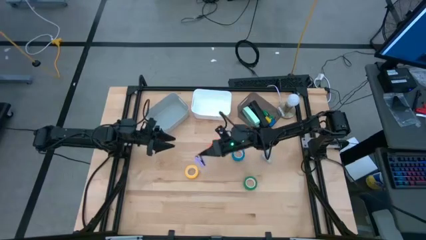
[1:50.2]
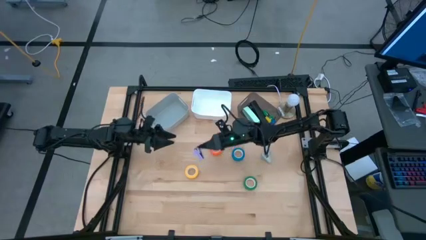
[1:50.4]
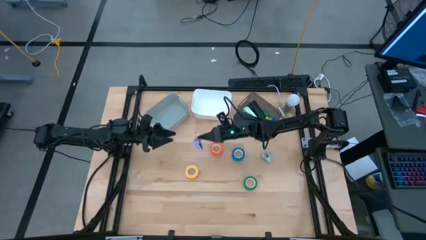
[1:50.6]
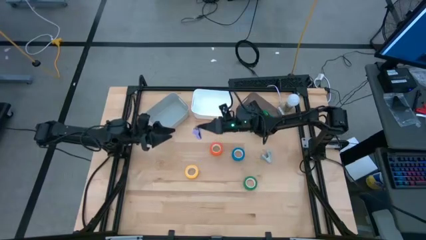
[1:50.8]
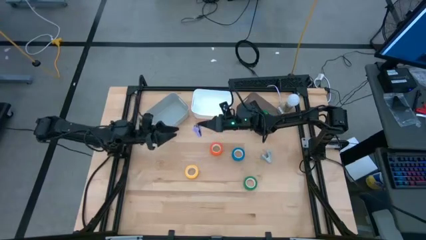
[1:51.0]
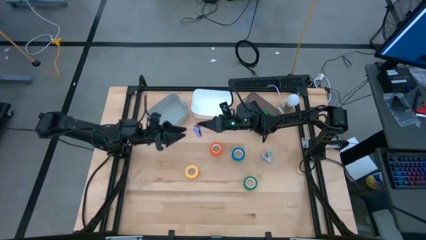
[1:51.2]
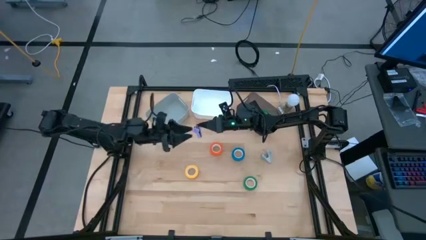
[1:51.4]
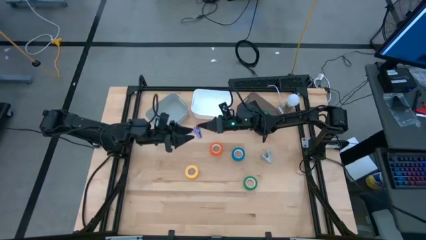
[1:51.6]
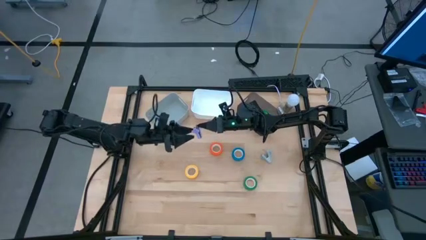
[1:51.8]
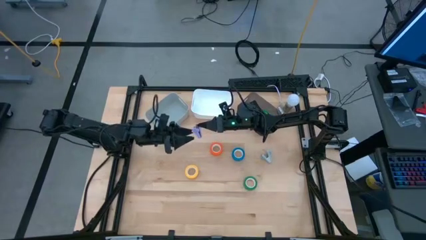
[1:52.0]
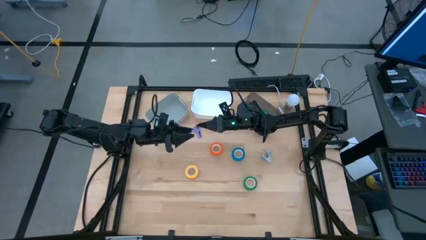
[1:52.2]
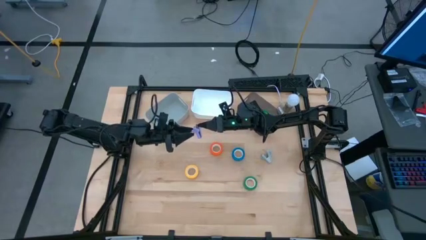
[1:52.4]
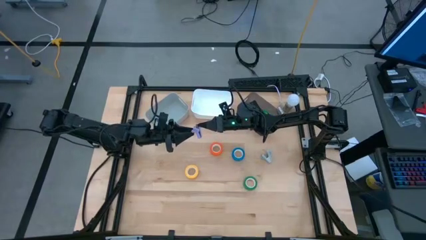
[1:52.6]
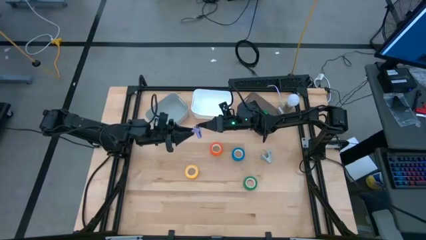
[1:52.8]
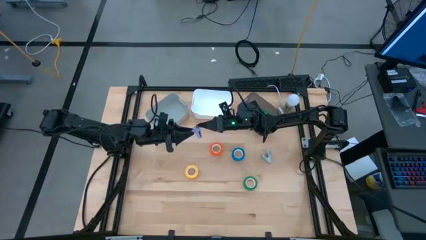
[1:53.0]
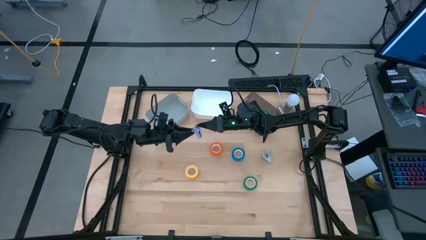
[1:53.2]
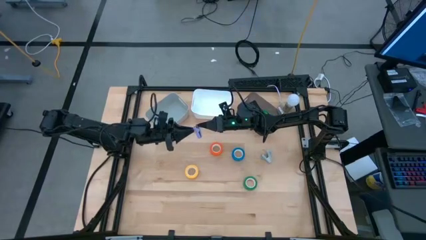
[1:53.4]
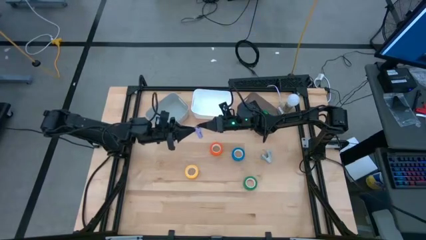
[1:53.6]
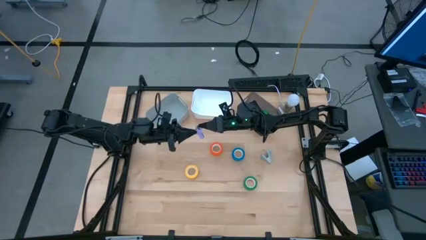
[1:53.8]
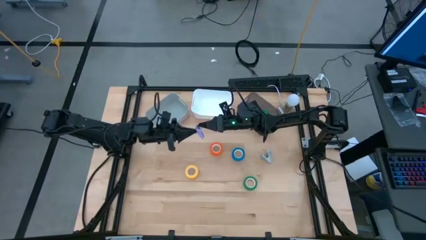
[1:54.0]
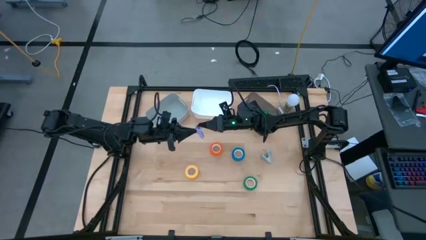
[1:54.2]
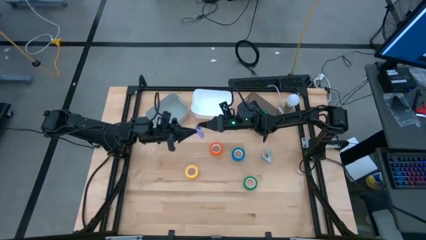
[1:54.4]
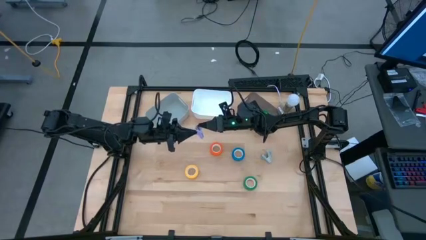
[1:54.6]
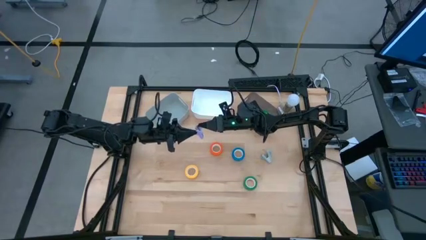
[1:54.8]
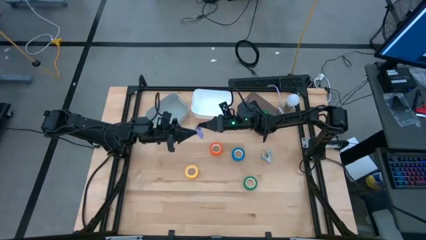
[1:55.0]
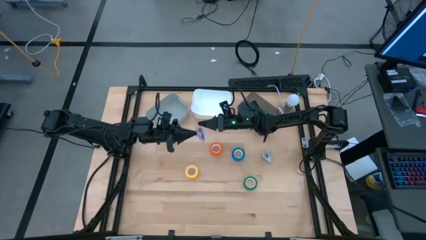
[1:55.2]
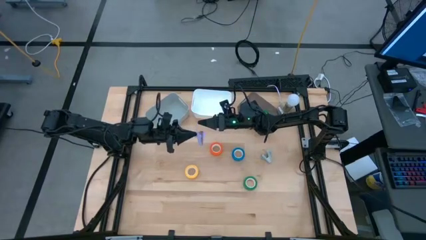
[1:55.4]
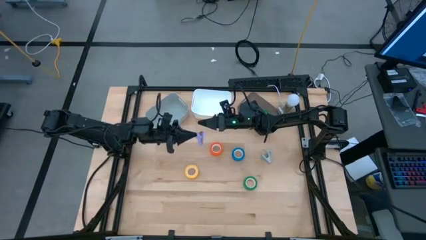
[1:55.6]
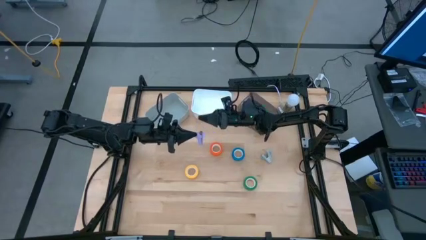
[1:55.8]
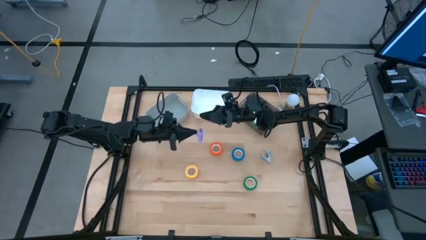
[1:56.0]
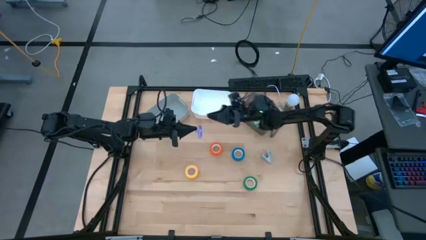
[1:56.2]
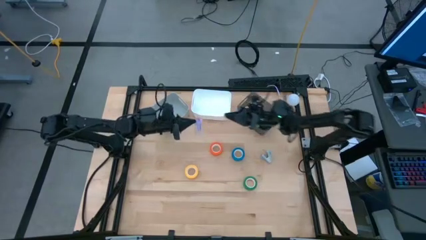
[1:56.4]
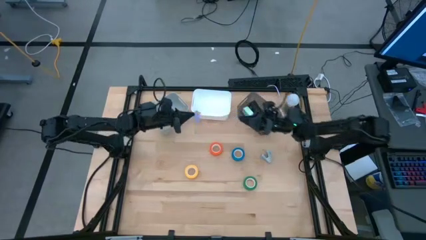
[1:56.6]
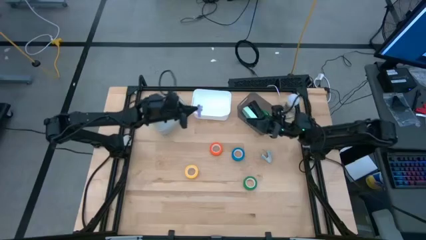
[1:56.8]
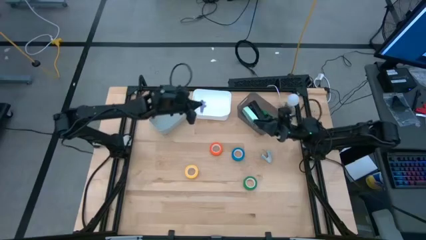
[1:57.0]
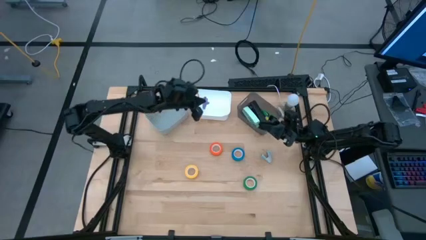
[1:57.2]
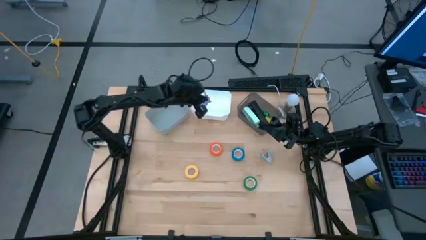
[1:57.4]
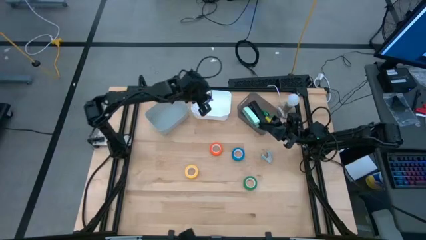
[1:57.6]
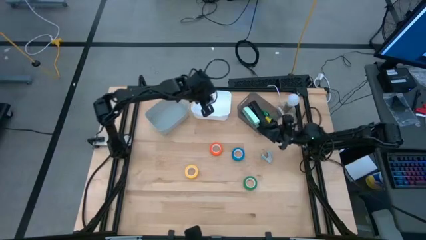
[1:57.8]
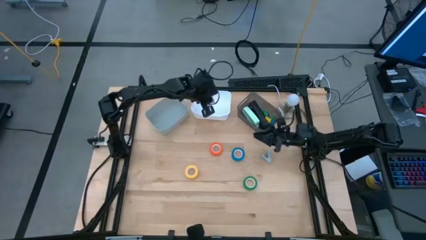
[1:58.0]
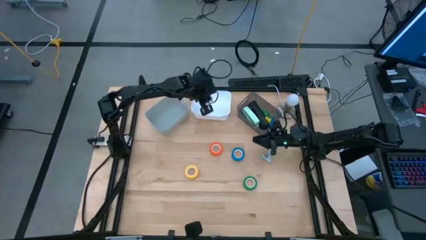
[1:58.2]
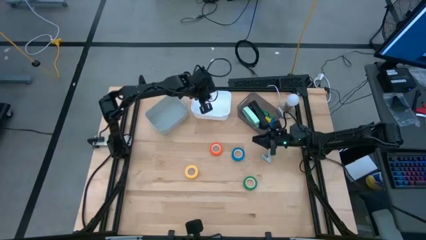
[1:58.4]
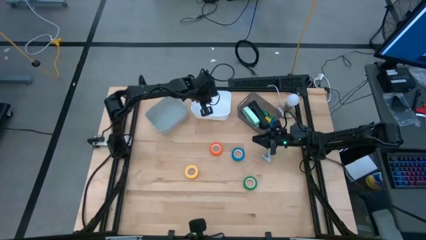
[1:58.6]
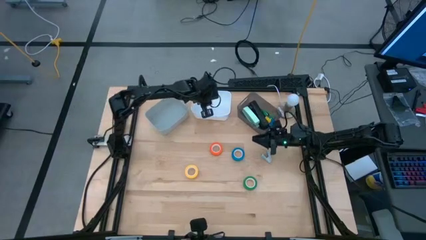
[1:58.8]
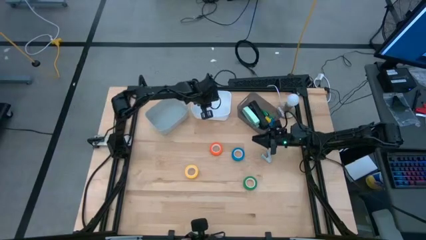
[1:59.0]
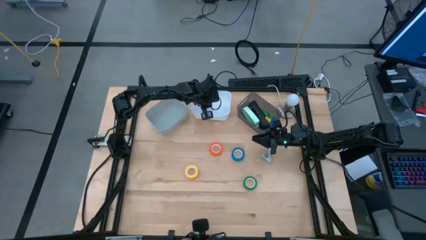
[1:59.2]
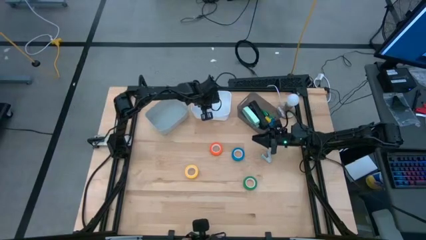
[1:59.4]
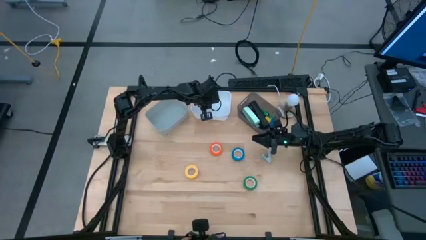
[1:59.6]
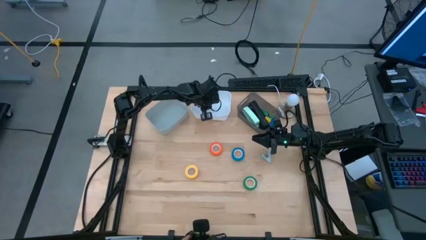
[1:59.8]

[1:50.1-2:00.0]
Task: Pick and place Stapler, Stapler remover, tape
Put the purple staple remover into the white bin

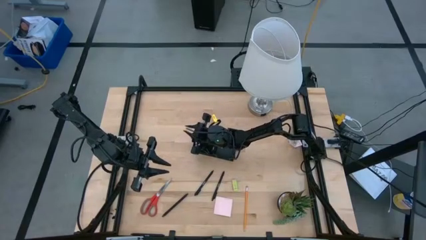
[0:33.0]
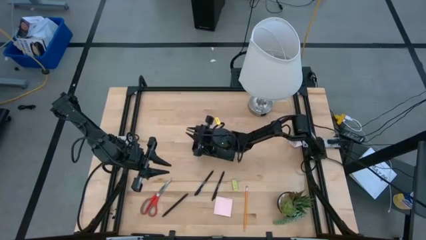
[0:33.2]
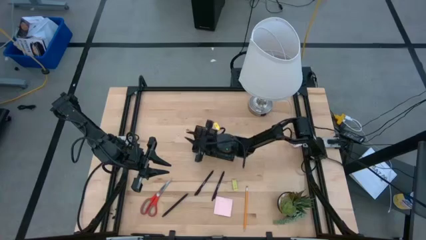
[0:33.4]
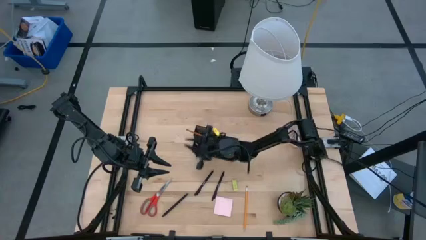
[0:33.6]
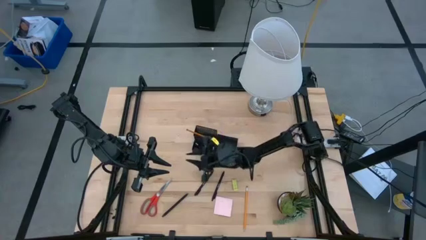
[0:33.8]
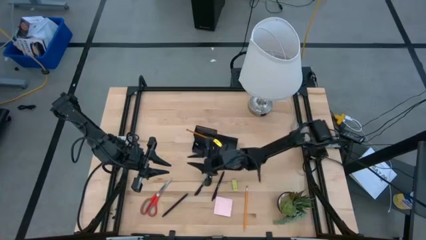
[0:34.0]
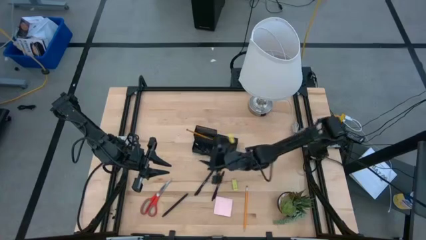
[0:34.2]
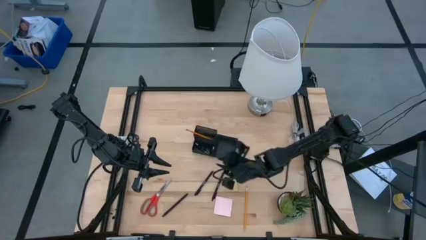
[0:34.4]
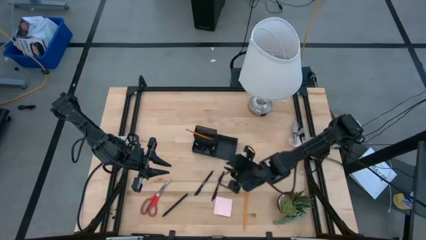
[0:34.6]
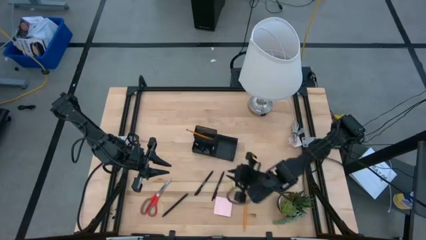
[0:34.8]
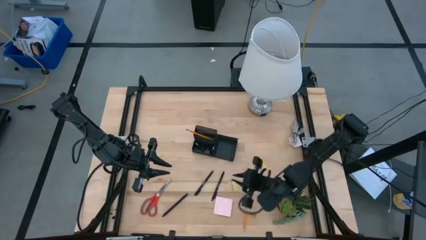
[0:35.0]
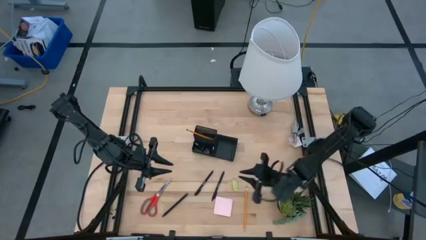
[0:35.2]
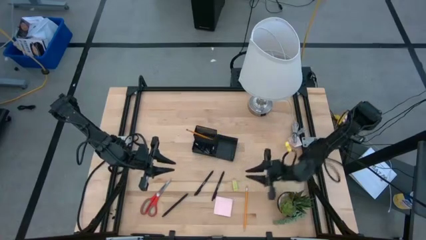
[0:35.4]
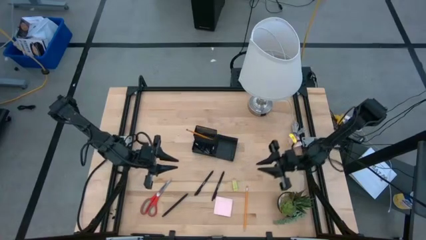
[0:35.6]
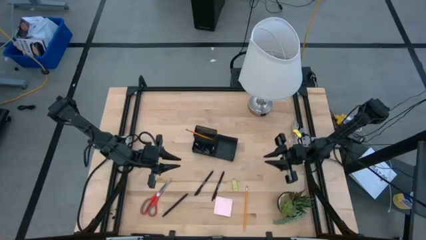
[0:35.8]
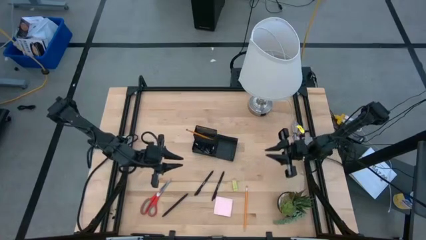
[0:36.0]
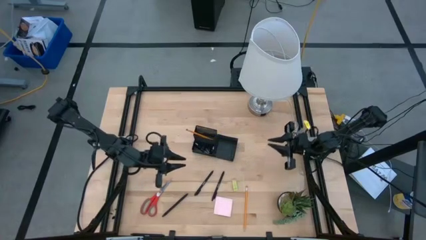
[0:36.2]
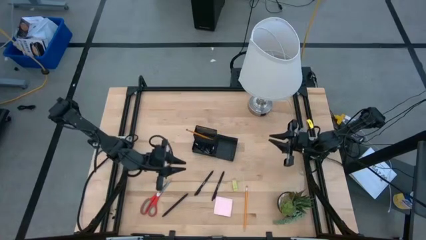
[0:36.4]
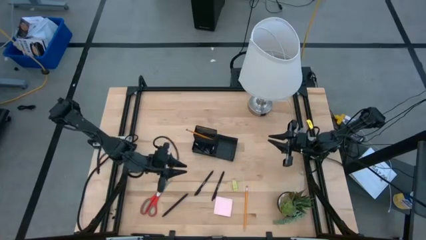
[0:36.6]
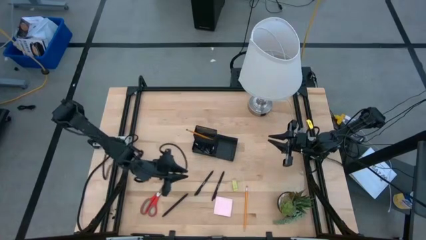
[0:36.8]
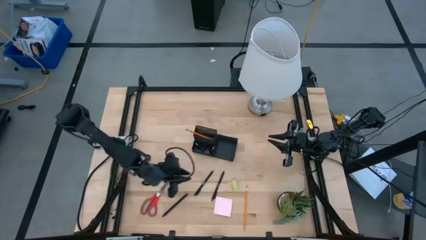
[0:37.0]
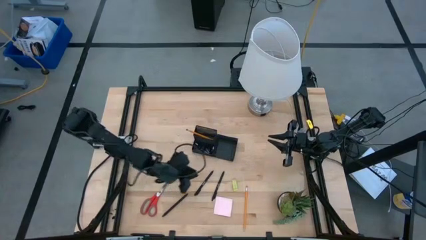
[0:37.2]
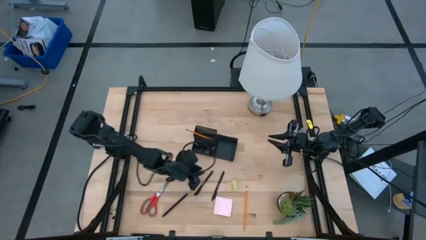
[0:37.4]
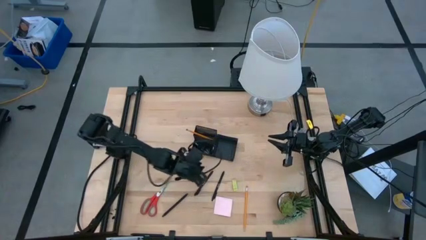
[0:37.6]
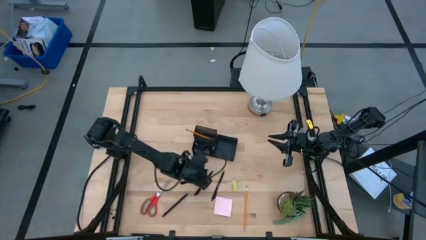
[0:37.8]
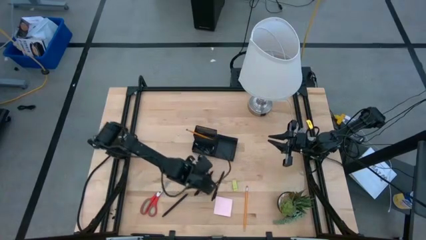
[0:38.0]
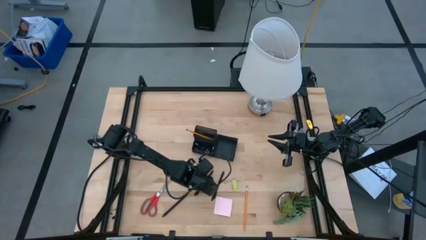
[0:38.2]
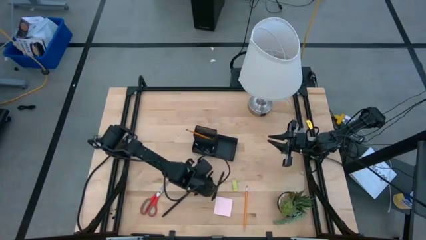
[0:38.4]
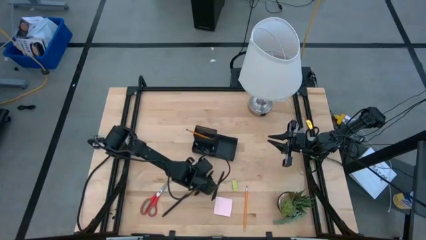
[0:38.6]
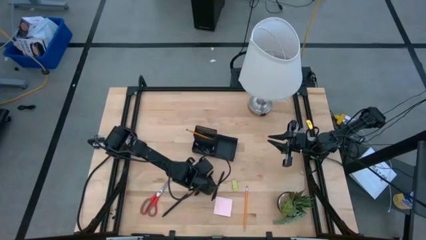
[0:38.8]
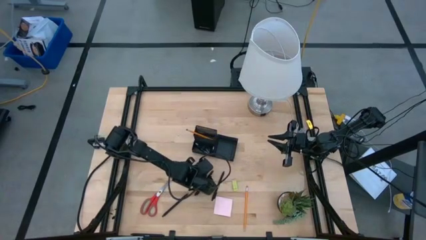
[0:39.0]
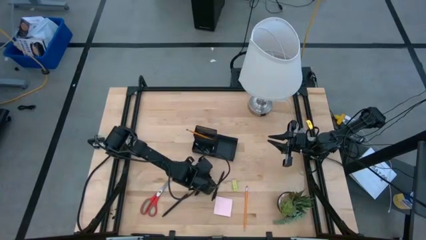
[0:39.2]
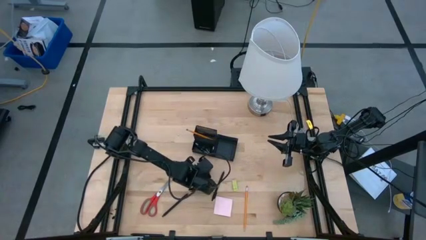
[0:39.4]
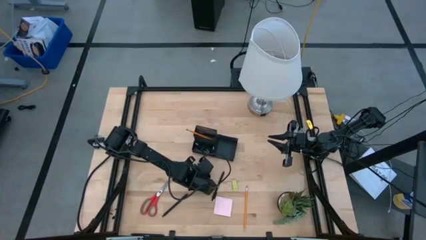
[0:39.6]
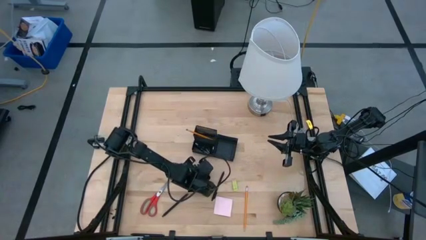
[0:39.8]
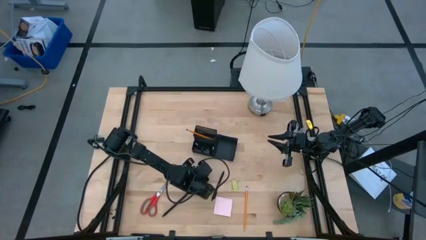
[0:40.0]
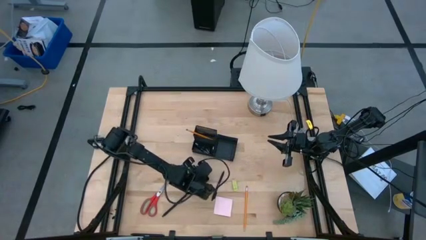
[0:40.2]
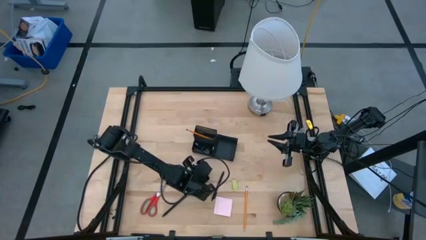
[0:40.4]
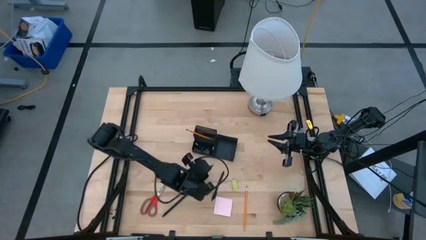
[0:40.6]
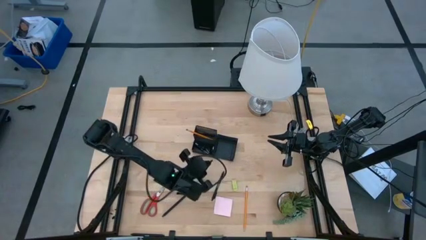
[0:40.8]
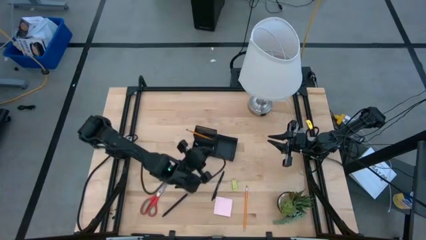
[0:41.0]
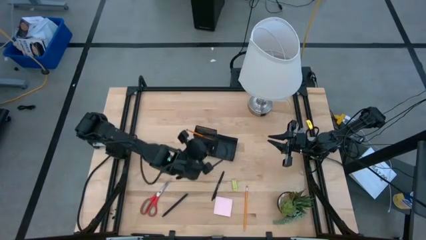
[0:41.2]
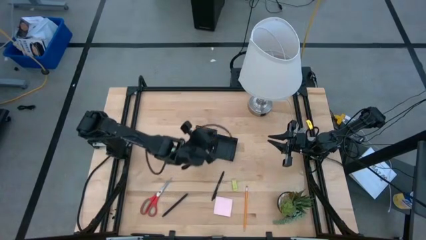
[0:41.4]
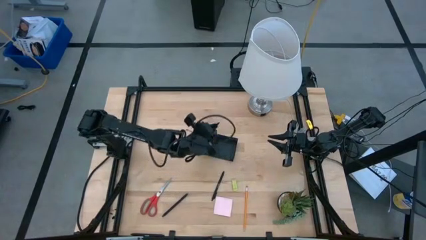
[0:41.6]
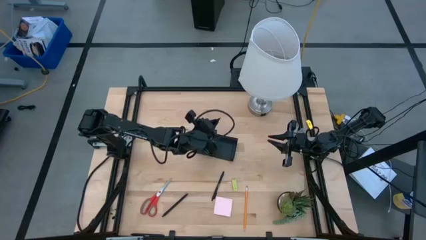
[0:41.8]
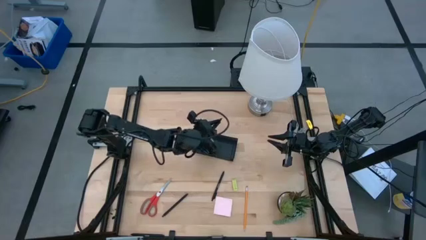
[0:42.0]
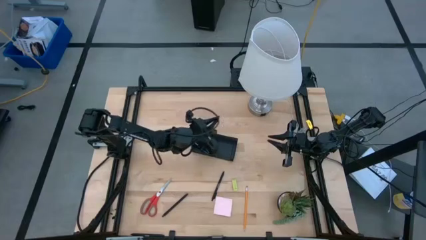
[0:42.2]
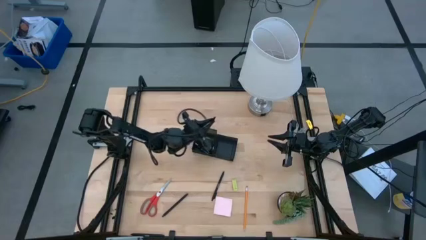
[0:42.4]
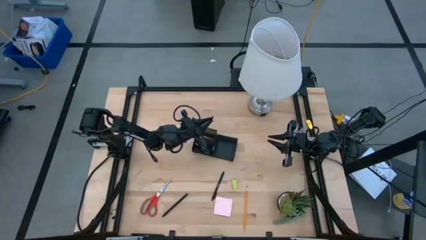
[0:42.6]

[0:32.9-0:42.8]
Task: Pick and place office supplies into organizer
Put the black pen into the black desk organizer
